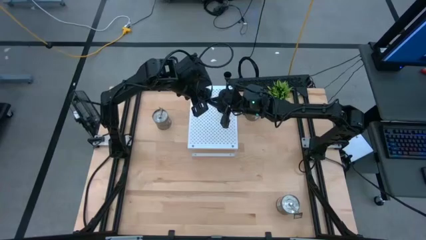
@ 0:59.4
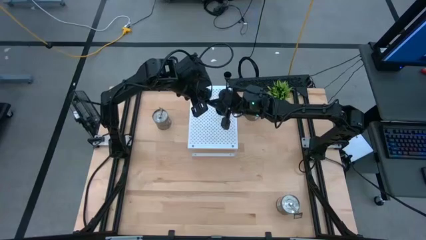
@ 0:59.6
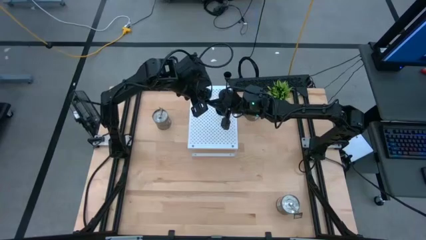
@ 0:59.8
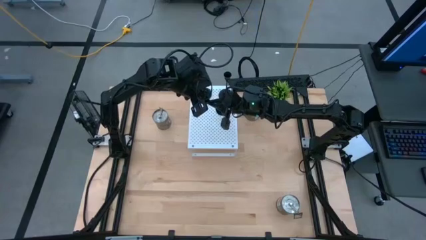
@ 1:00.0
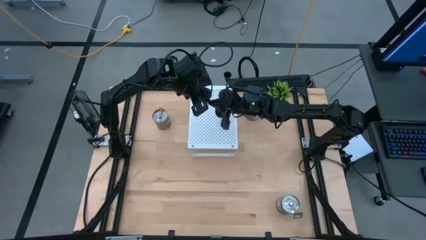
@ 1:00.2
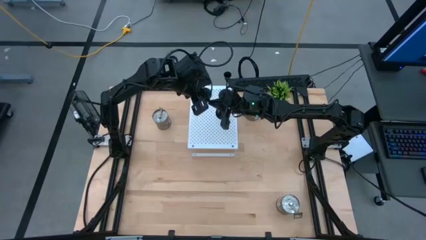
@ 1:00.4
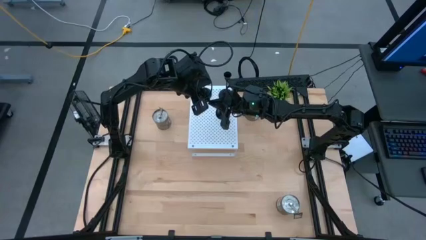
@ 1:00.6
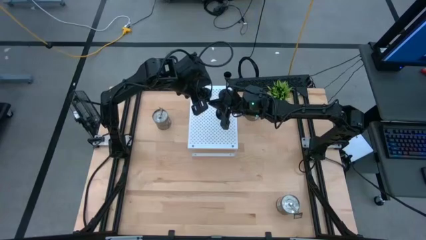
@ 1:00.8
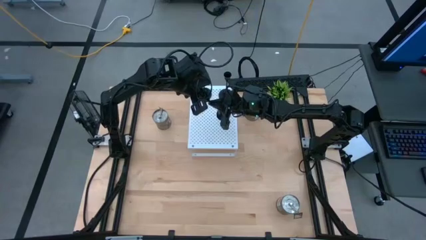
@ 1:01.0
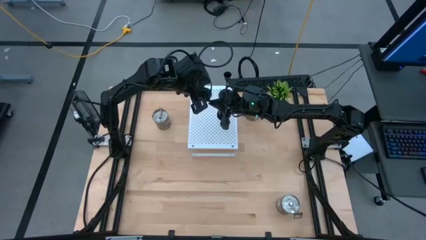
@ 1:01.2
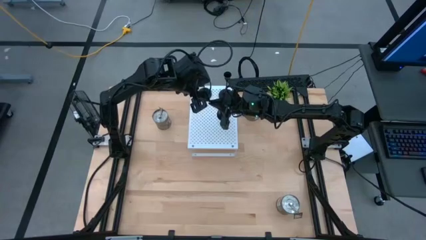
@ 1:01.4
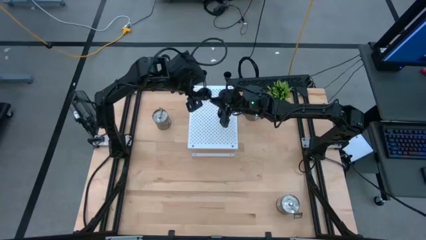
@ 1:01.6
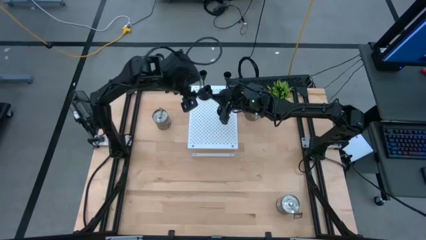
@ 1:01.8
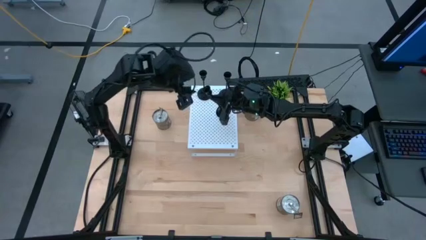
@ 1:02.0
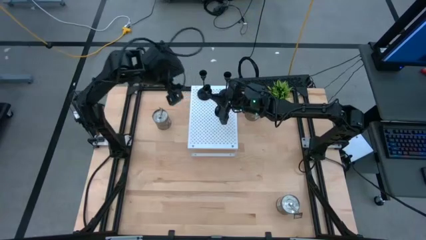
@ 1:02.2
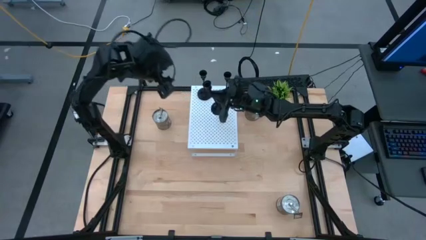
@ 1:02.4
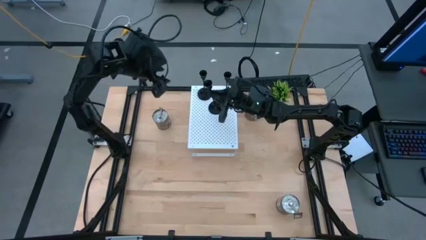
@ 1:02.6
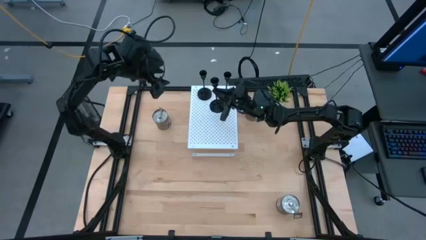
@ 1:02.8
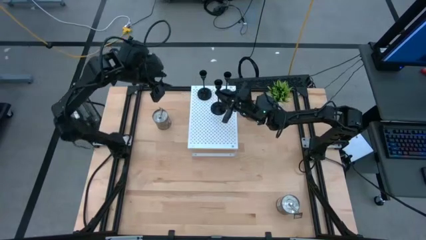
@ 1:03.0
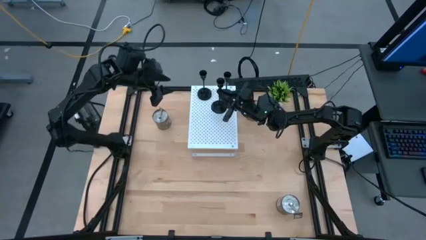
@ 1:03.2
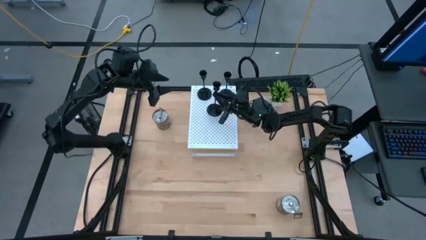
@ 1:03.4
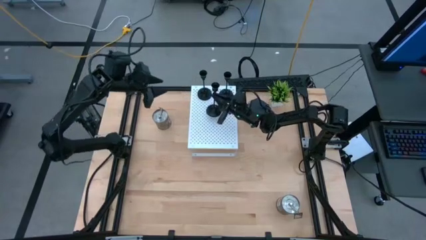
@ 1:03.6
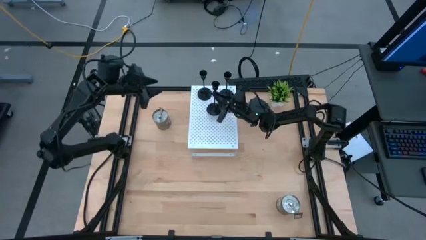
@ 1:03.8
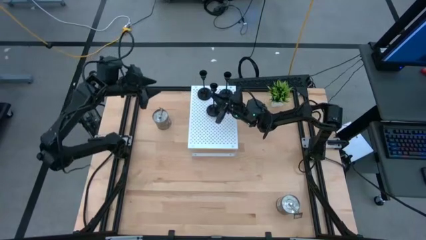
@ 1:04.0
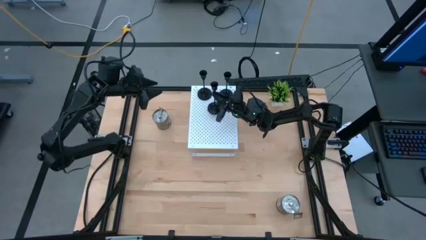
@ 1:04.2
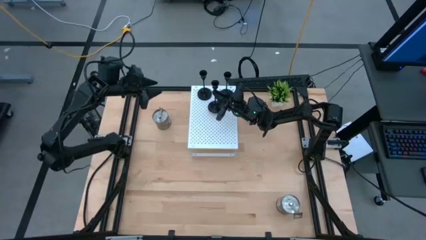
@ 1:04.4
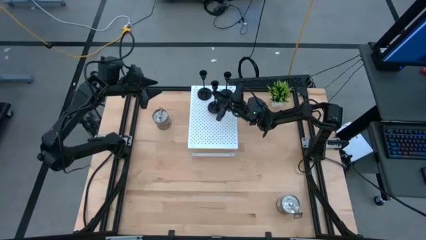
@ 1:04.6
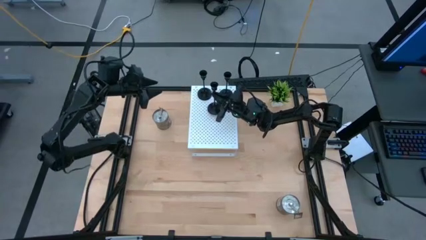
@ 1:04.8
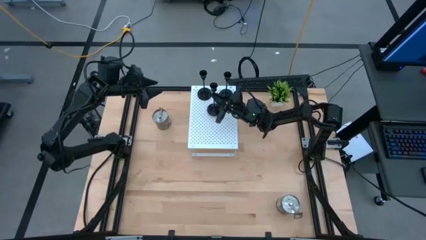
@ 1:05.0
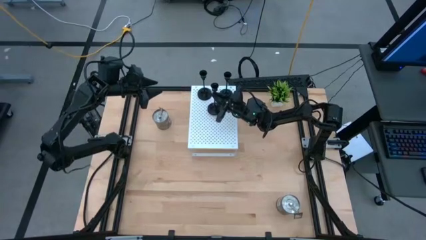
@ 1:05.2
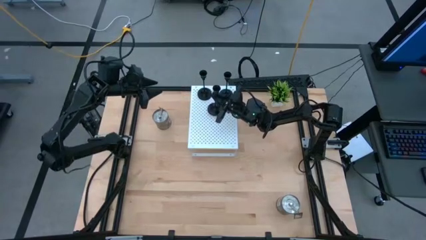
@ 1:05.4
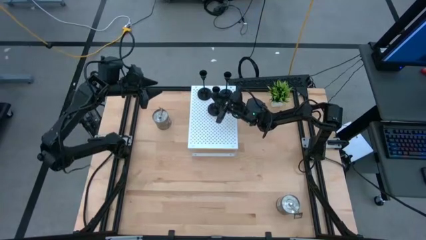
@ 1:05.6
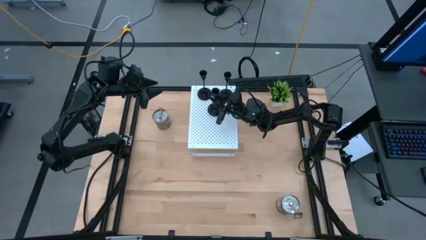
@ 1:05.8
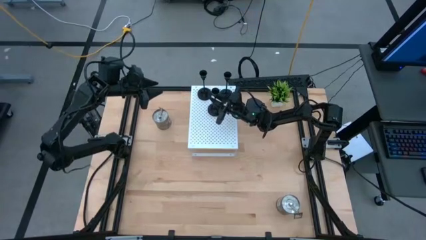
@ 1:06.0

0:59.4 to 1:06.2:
Task: Pick & Place candle stick holders
Put the black candle holder on the shelf

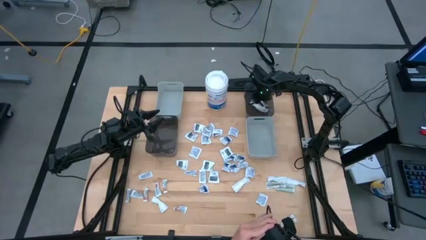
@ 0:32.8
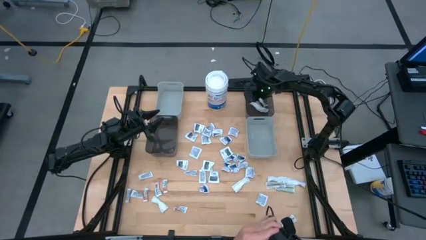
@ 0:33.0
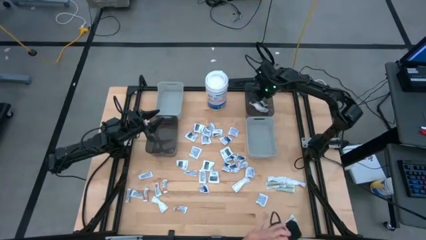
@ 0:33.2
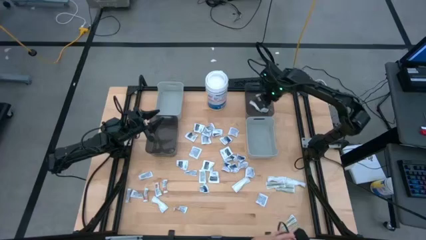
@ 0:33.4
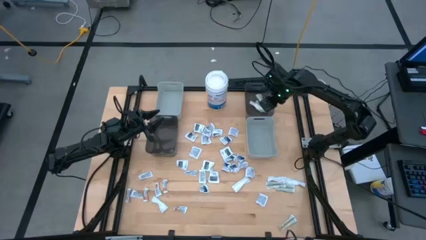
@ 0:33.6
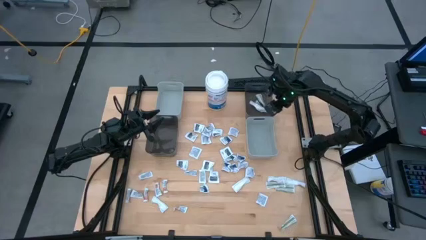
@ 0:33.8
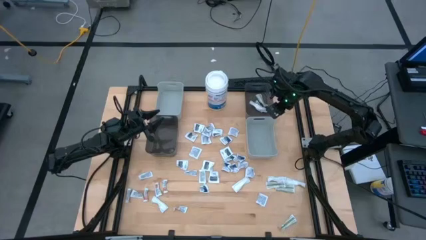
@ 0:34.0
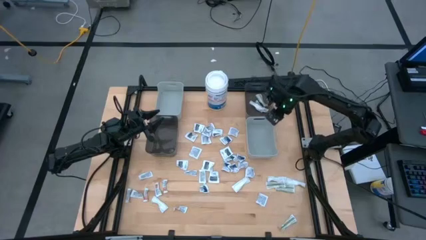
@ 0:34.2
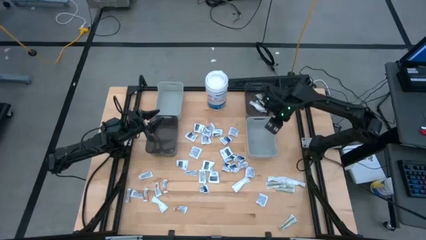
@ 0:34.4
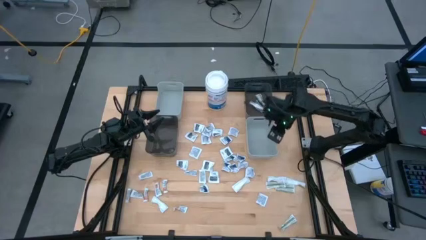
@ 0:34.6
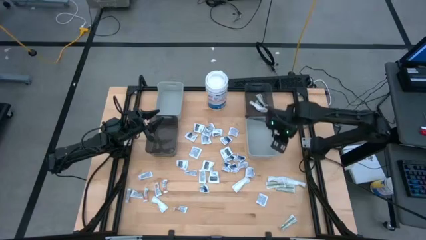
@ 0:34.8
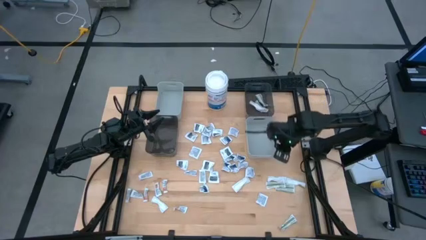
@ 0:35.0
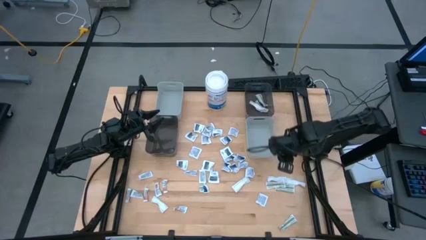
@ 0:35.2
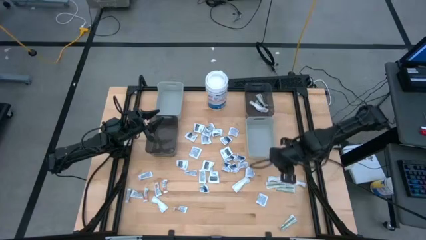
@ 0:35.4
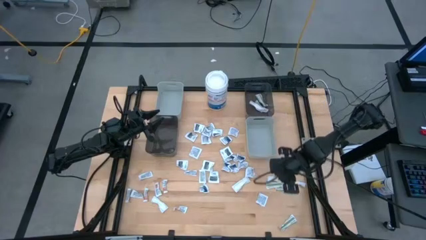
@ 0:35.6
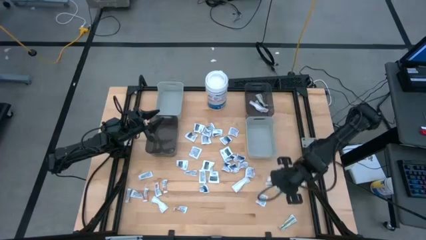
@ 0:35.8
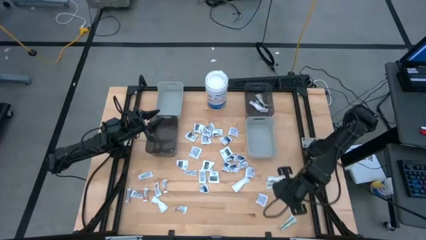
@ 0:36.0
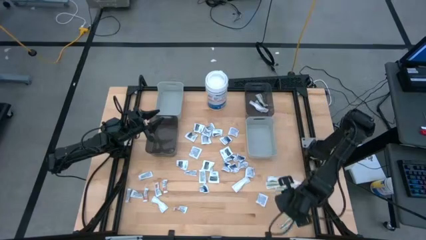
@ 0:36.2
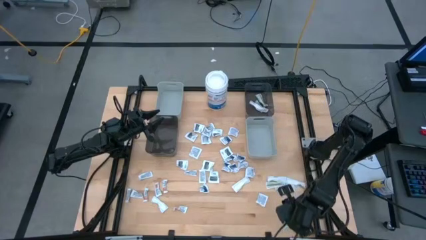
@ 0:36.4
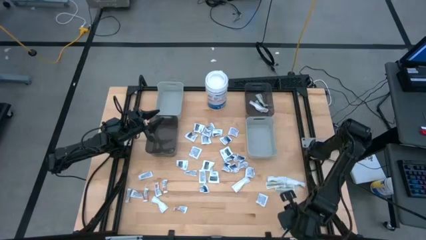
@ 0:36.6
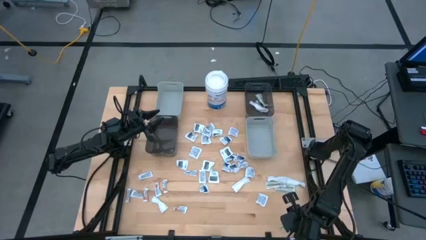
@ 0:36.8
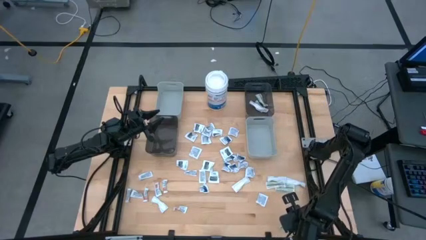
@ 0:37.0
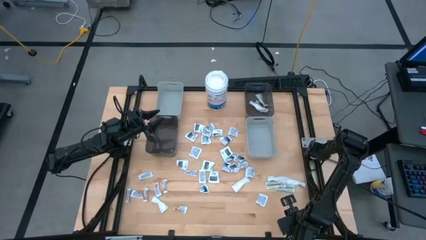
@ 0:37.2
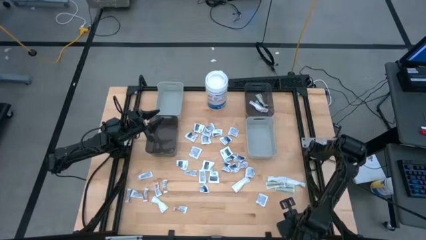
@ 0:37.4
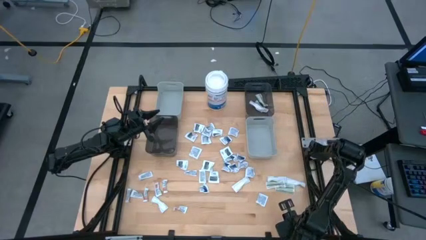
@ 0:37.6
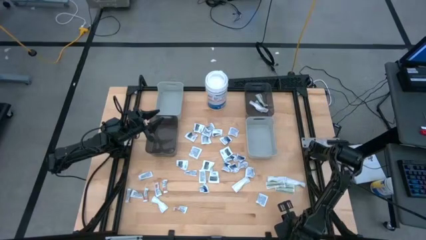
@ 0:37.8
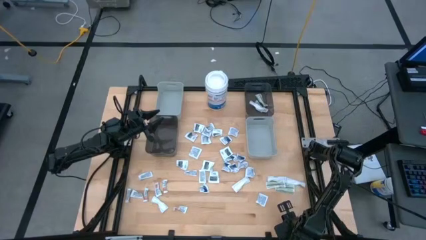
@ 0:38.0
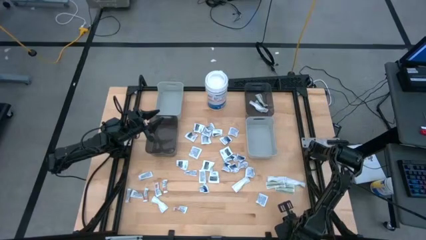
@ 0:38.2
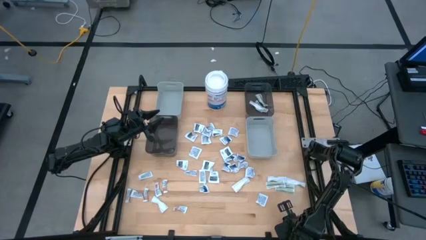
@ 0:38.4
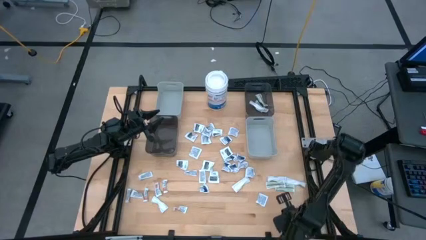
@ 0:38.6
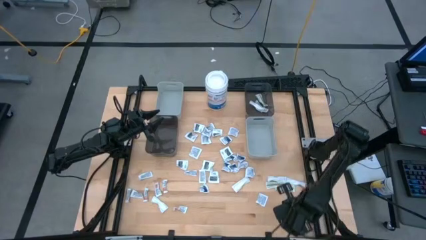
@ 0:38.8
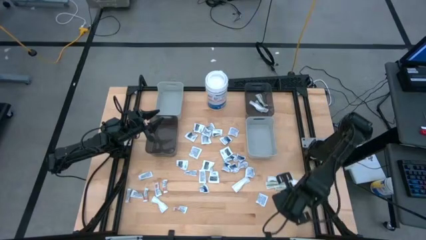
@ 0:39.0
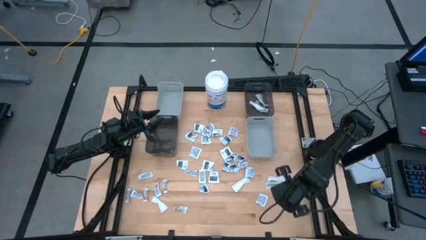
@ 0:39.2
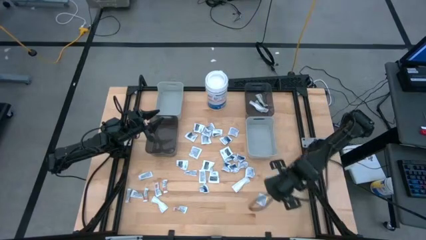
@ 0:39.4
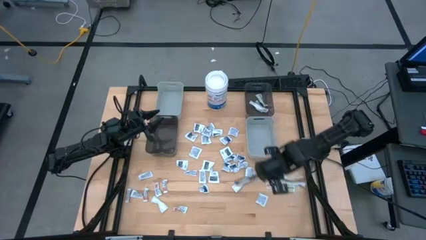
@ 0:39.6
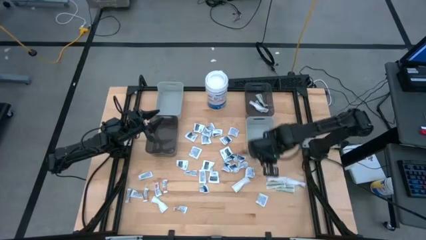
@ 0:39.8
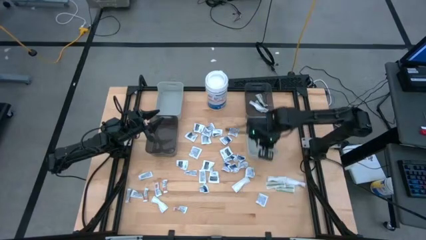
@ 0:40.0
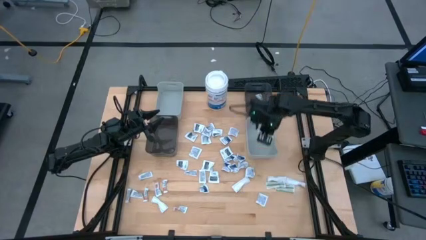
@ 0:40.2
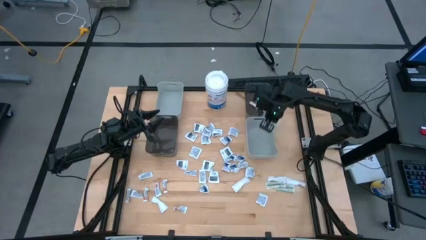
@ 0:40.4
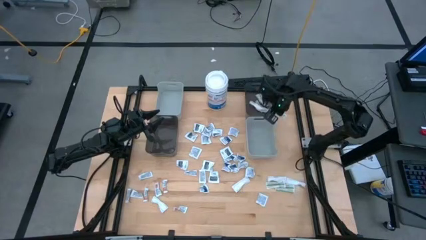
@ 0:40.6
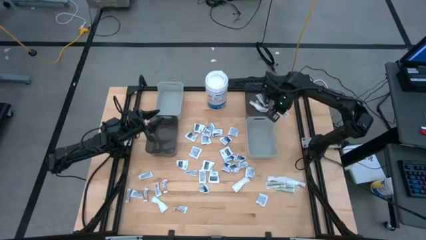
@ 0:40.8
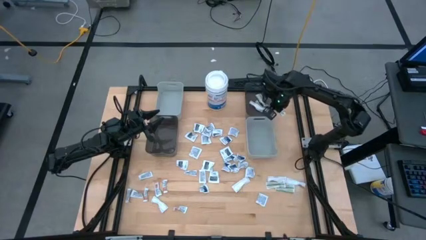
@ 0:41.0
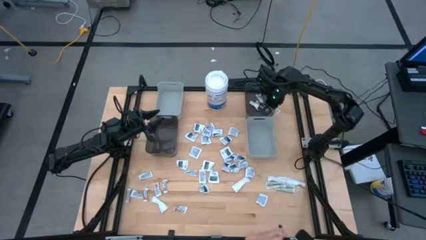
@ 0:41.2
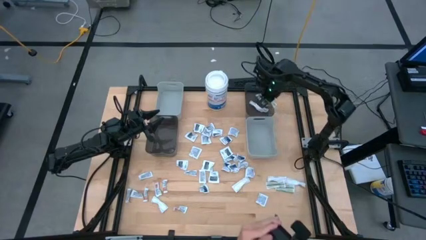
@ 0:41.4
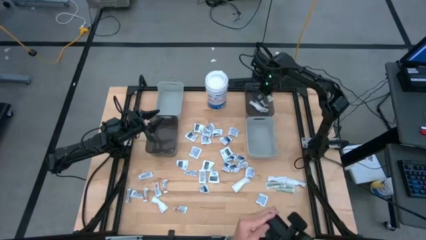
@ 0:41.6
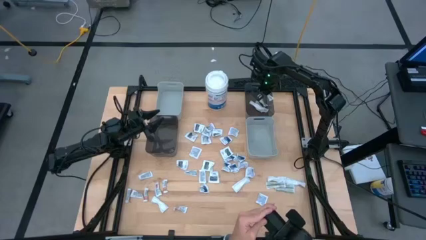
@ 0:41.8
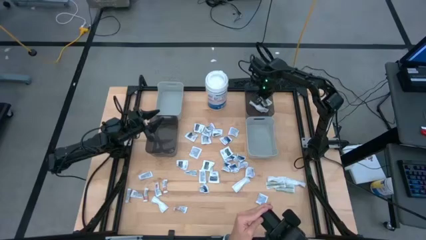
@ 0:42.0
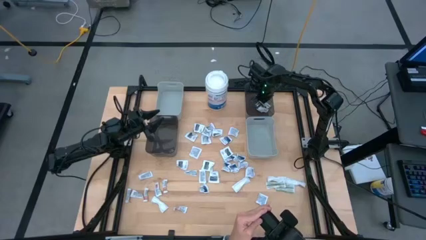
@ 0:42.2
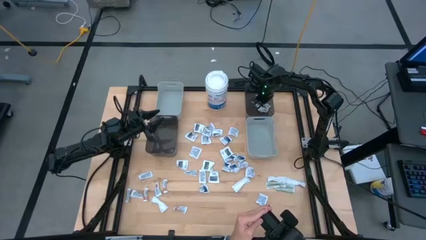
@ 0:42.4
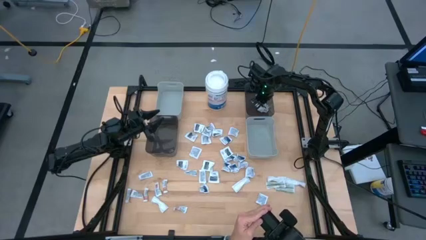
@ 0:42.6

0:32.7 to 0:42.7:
Task: Pick & Place First Aid Supplies
Put the green bandage into the right black bin
